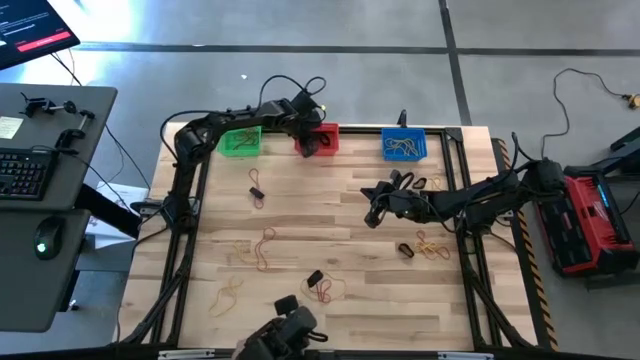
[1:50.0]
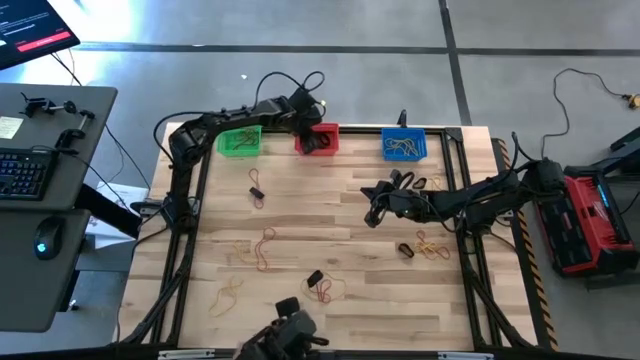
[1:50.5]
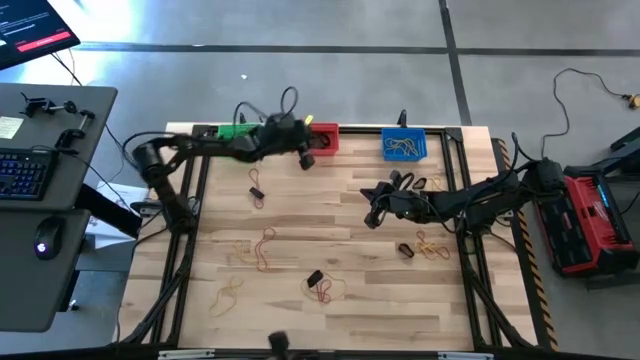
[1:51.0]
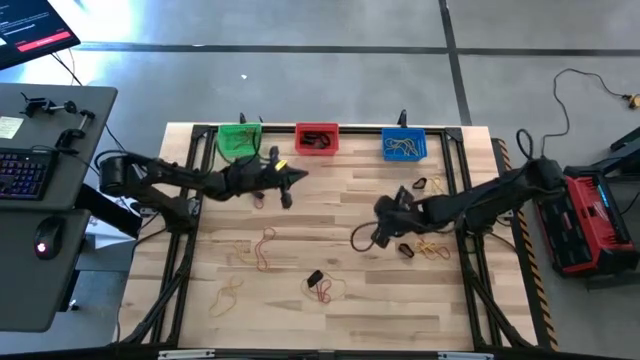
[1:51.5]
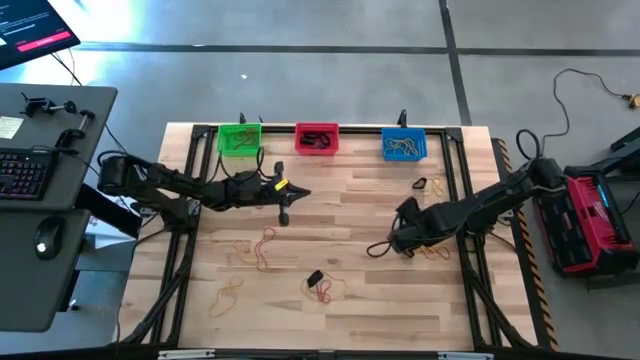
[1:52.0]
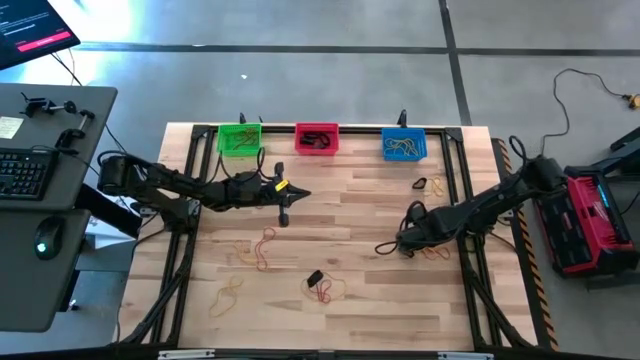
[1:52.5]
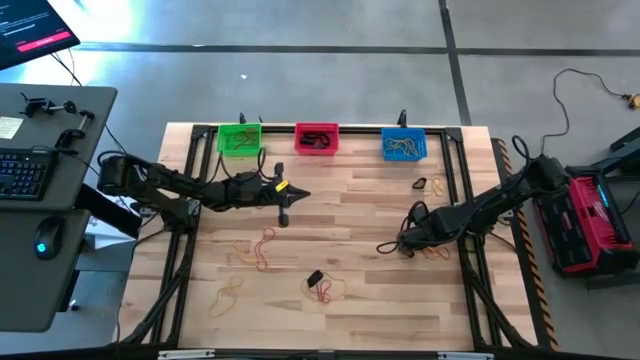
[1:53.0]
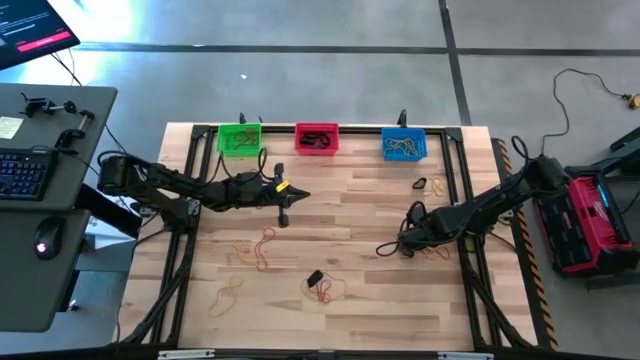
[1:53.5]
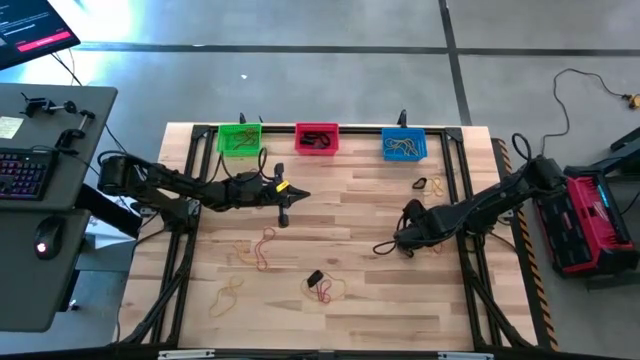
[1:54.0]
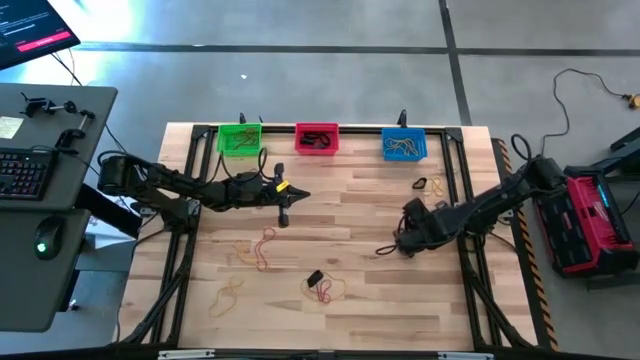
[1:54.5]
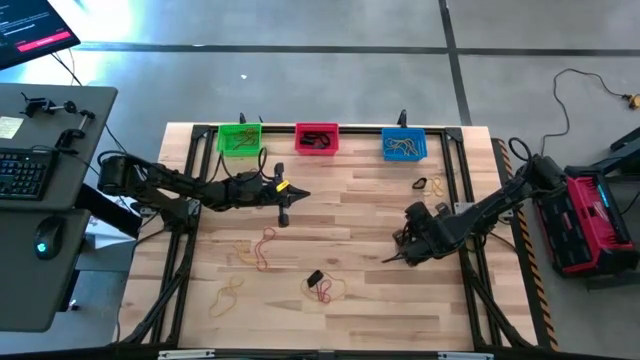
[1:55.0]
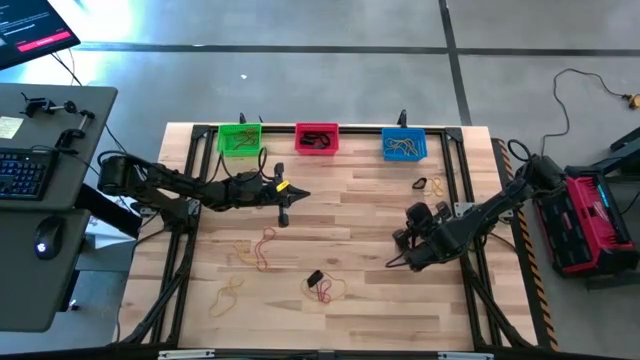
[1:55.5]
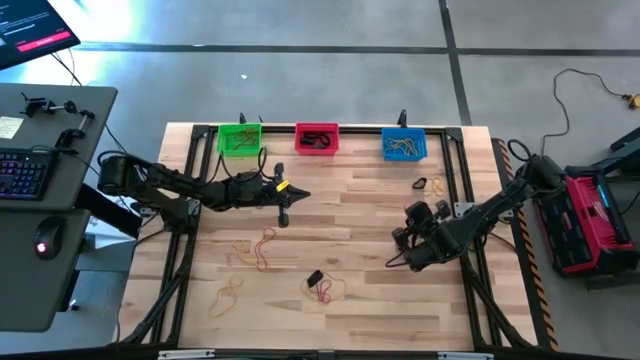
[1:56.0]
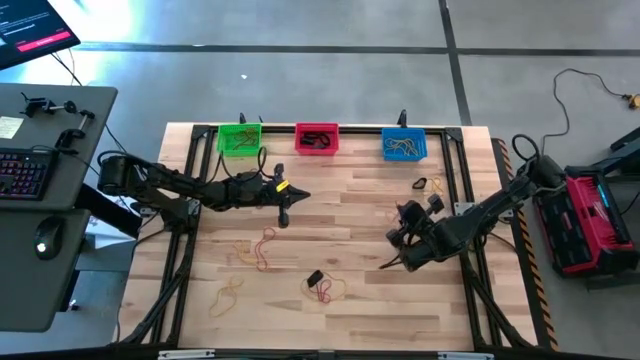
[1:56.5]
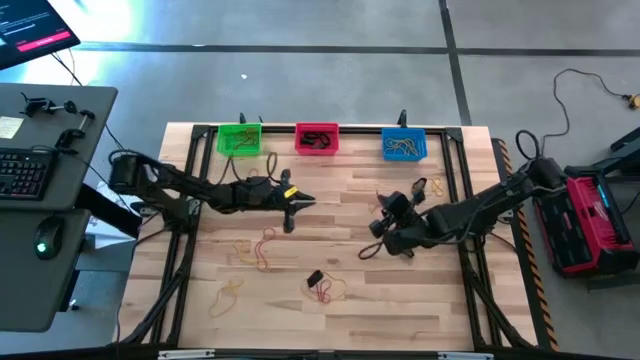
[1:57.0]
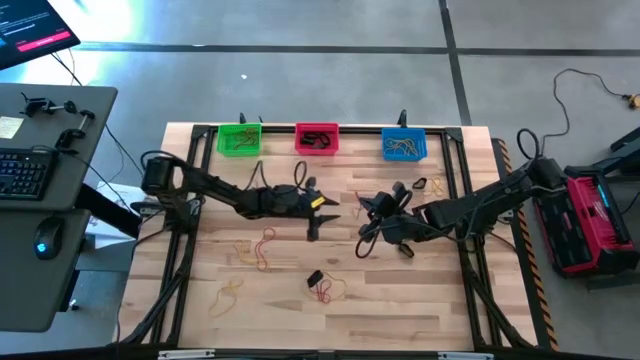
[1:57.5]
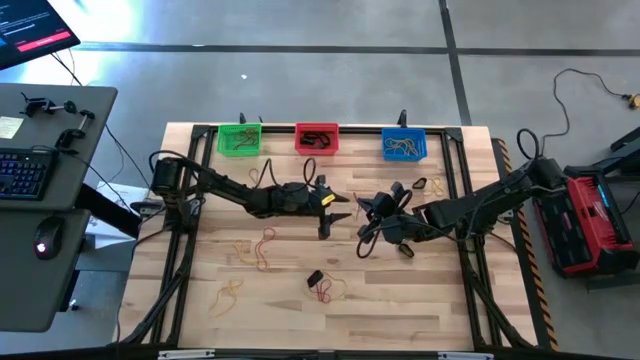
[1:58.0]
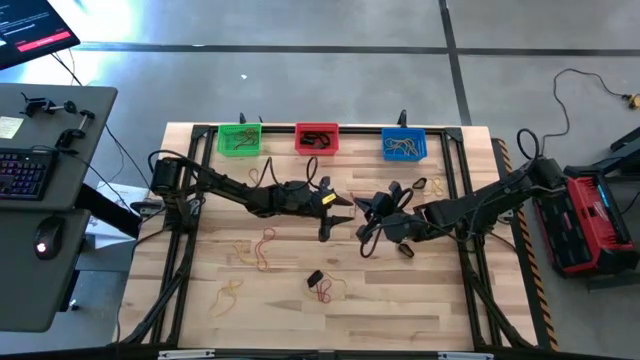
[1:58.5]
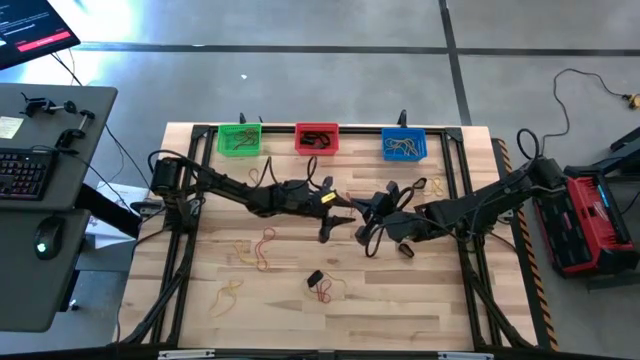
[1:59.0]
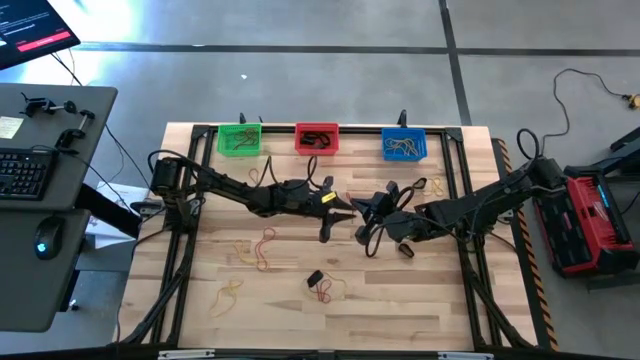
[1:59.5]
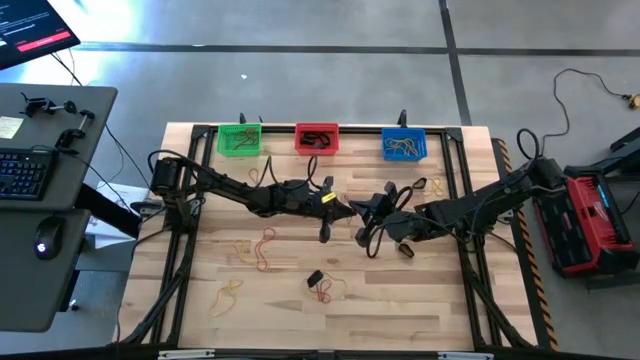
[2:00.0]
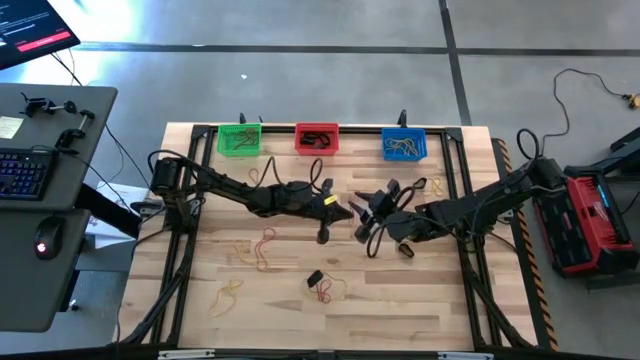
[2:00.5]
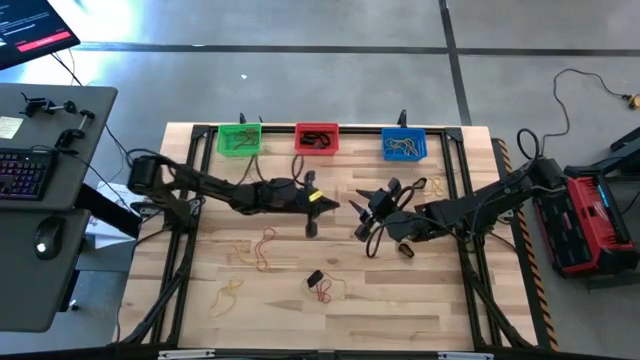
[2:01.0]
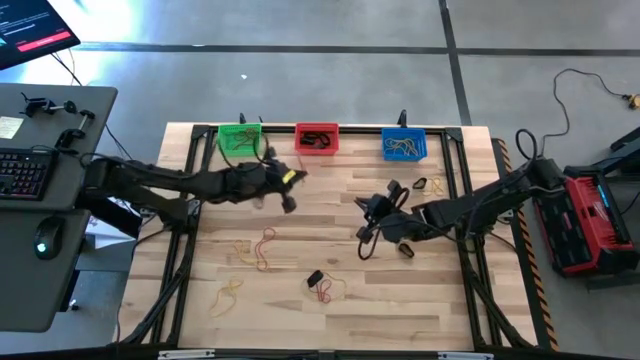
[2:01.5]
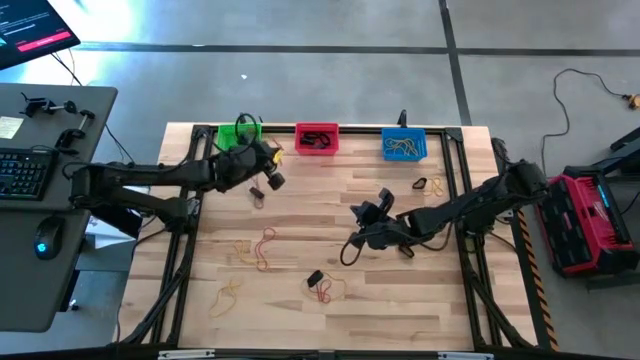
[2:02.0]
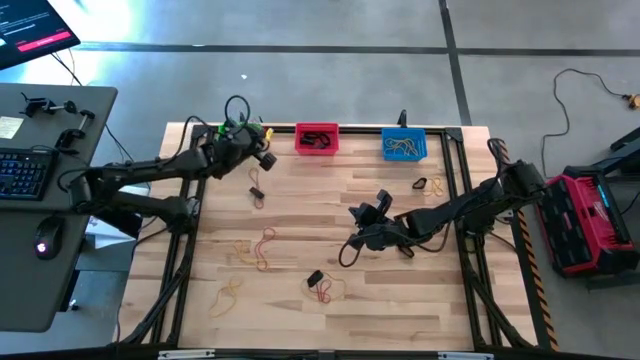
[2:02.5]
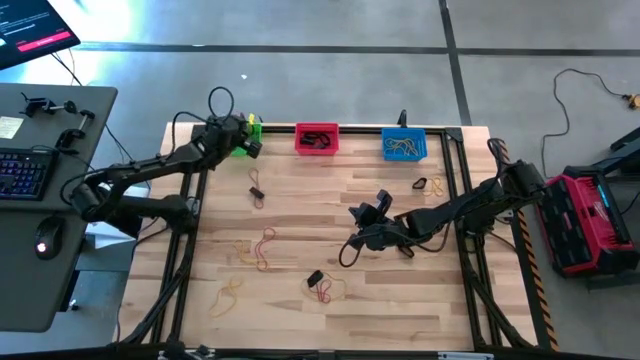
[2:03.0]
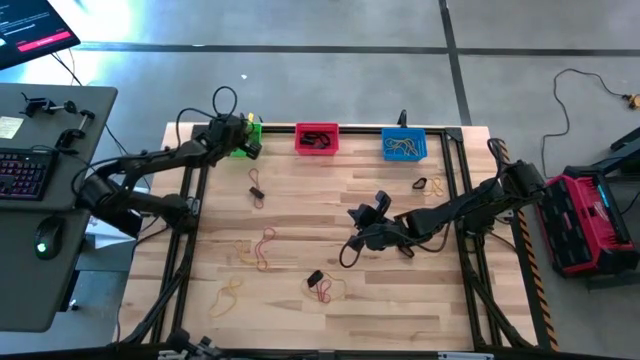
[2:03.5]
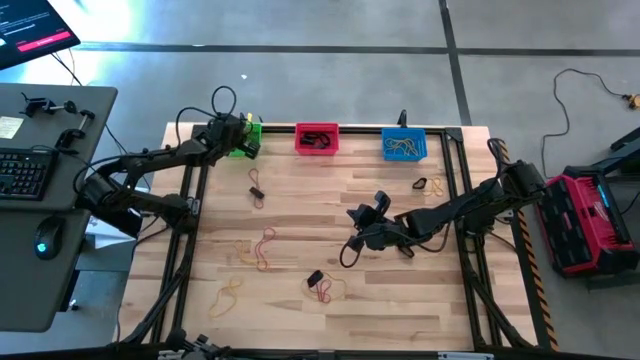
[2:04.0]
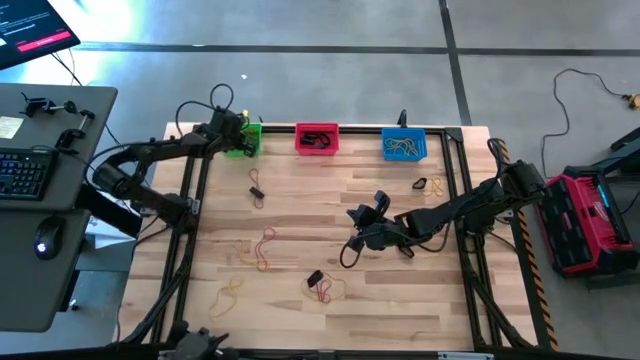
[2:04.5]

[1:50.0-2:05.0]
Task: Sort rubber bands into baskets
Put the red rubber band into the green bin

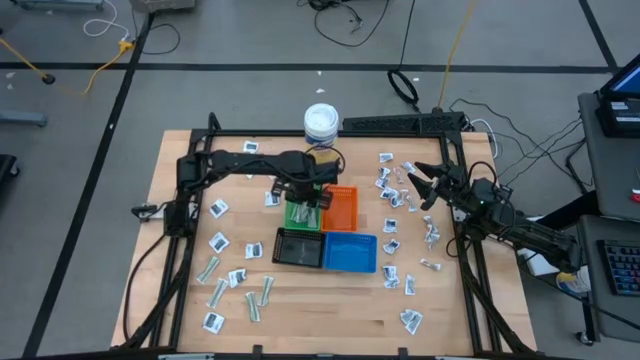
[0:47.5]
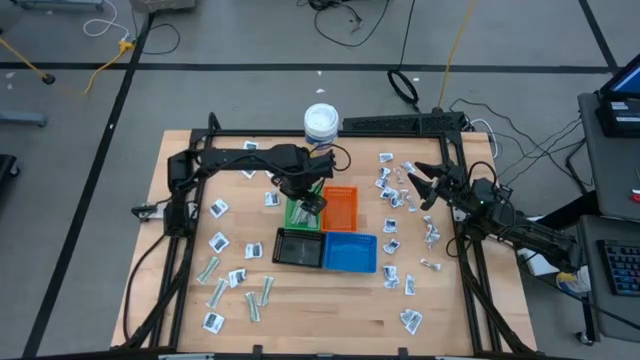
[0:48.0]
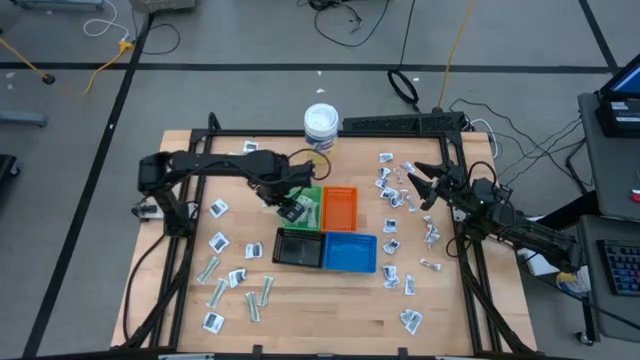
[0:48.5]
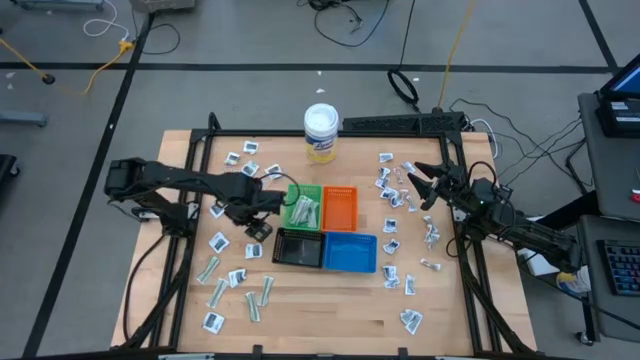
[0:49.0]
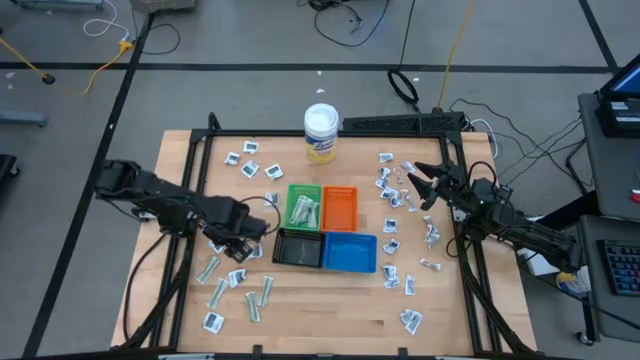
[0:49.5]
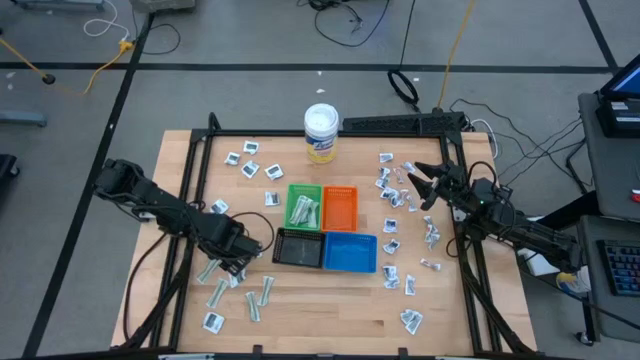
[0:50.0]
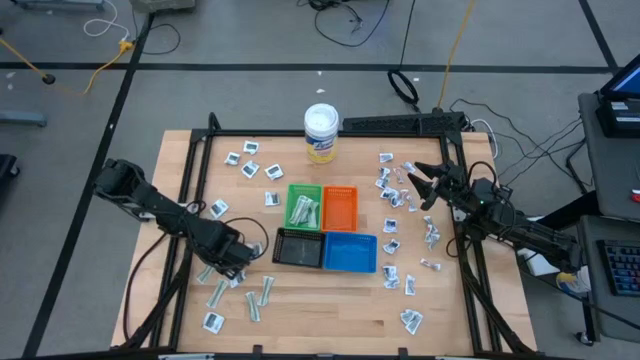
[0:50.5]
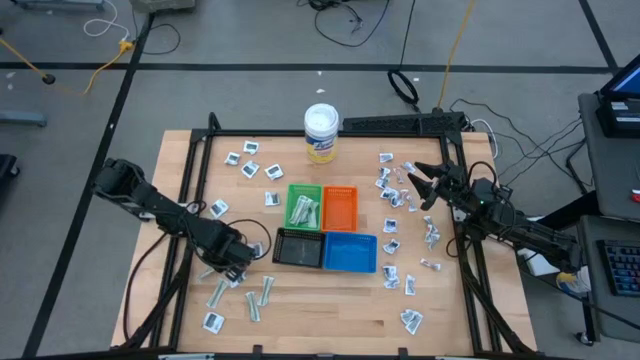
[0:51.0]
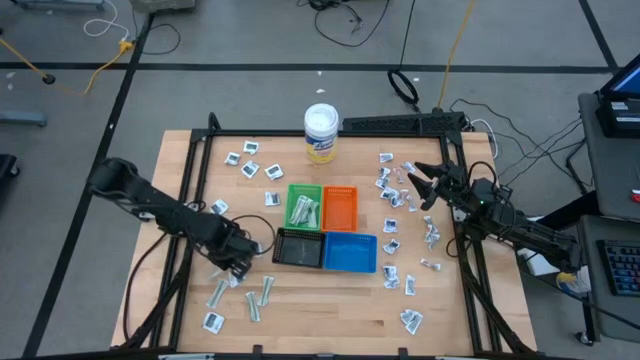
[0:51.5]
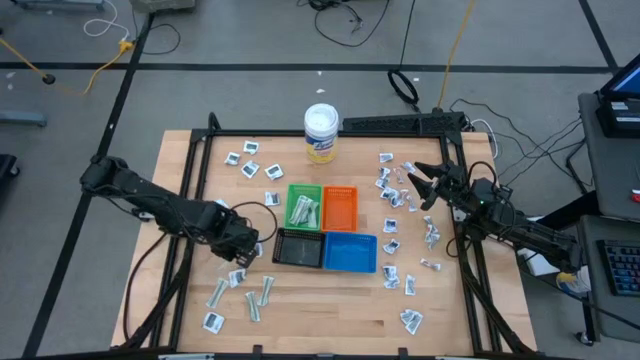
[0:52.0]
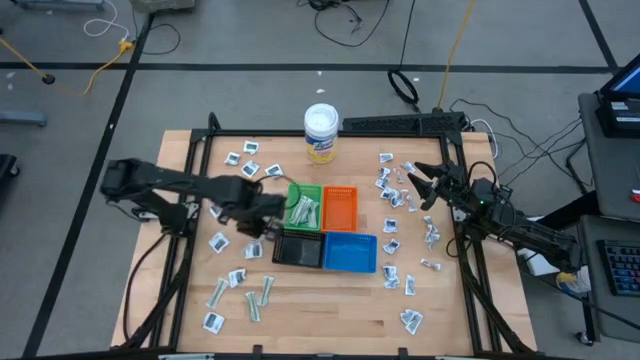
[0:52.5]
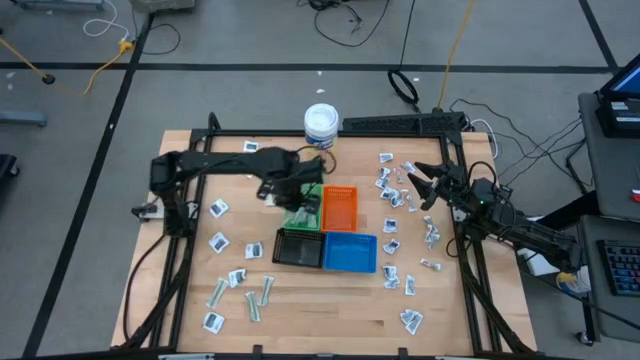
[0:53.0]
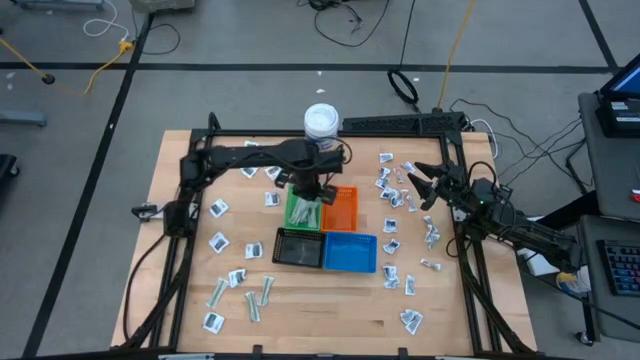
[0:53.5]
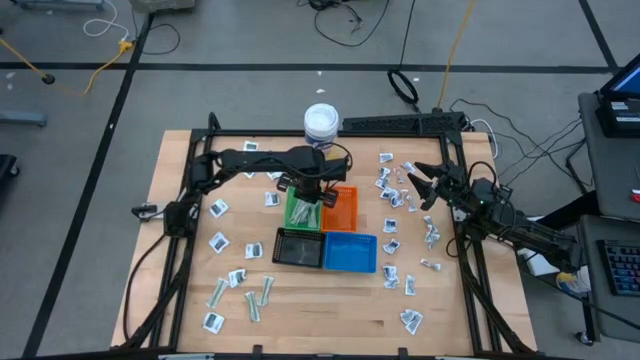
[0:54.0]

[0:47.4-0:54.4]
Task: Pick & Place First Aid Supplies
Put the bandage pack into the green bin
